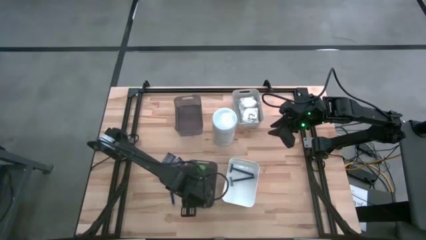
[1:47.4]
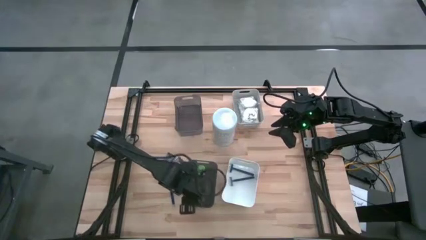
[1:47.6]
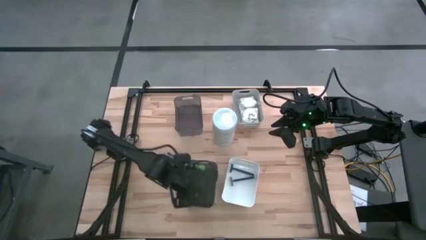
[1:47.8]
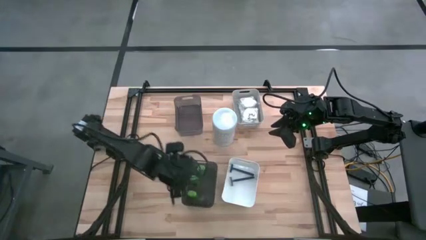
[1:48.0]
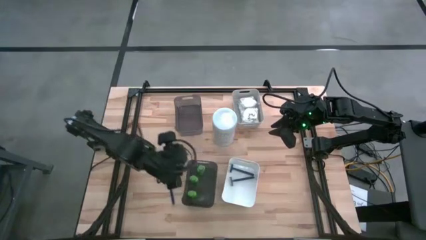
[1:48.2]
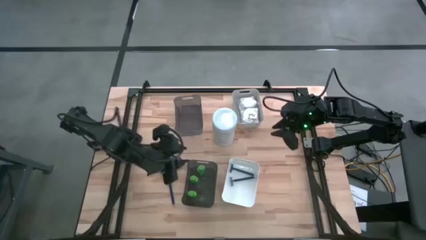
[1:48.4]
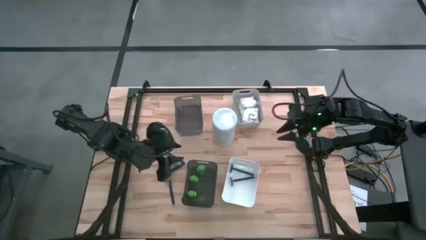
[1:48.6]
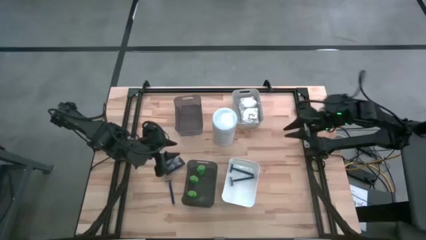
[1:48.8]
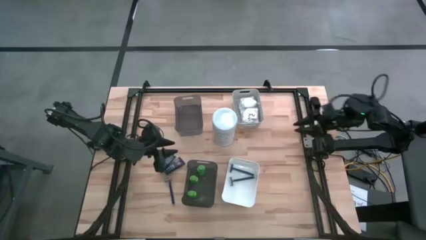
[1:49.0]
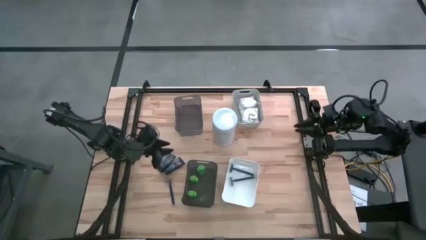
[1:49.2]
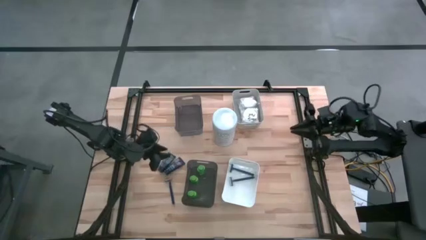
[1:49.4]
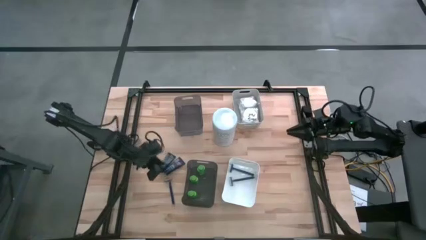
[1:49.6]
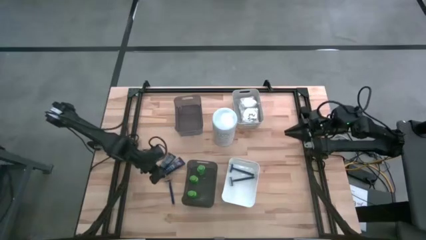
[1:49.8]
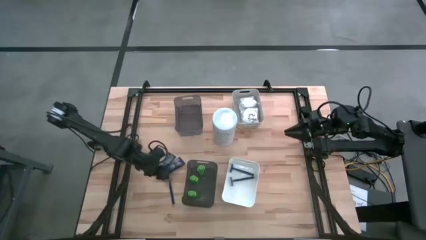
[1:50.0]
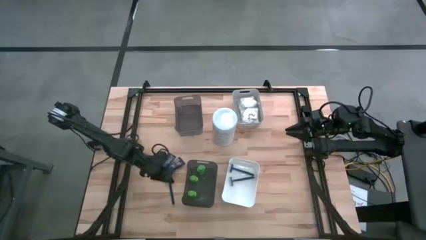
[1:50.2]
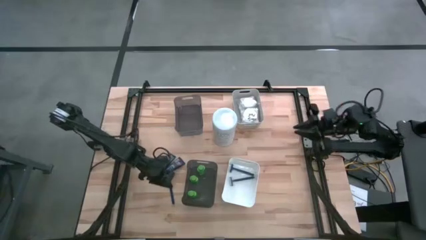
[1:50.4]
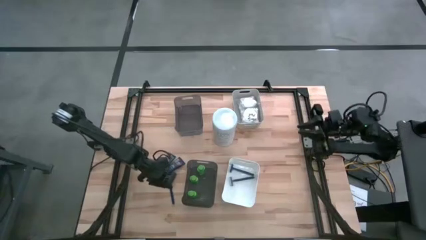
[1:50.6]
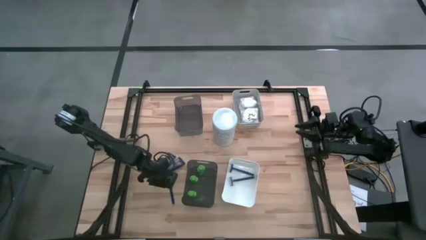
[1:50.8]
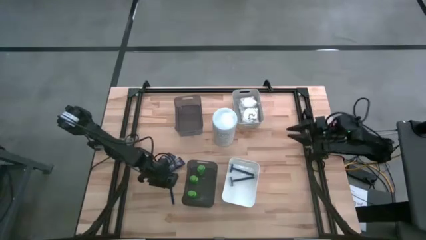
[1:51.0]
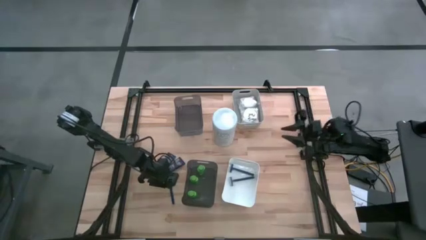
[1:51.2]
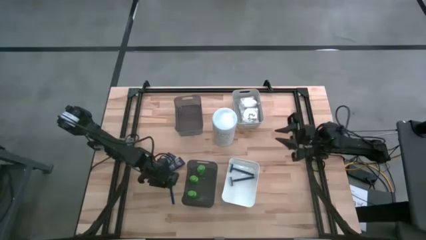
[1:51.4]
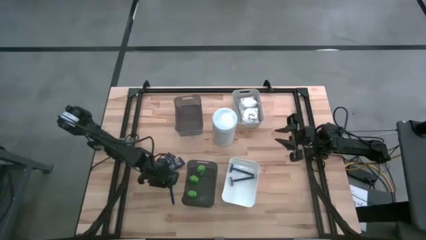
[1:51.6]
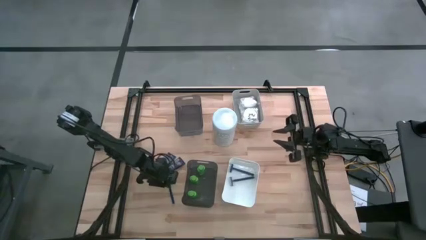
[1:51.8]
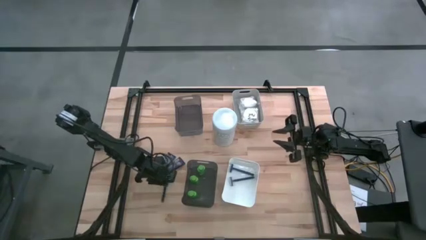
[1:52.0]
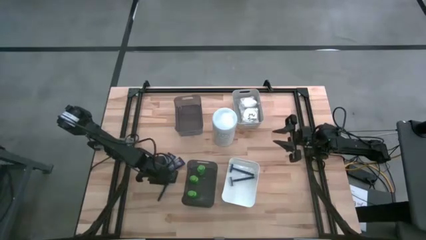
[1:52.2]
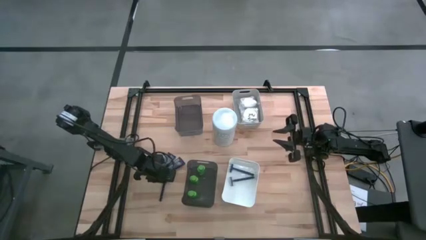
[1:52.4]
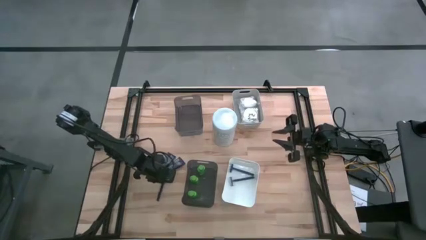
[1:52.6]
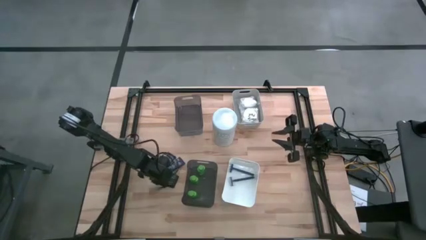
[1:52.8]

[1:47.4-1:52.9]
Task: Pick & Place Travel size toiletries
Put the blue razor into the white bin

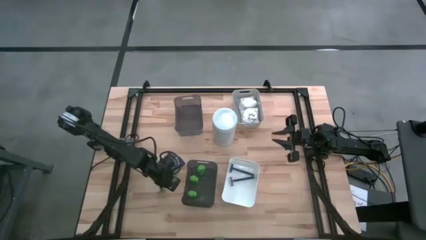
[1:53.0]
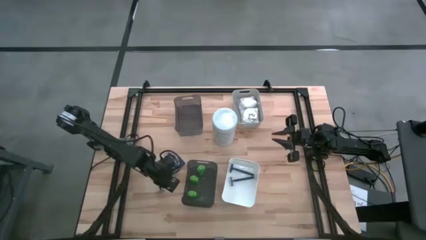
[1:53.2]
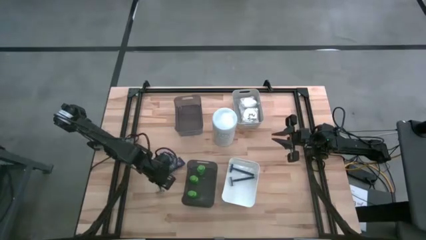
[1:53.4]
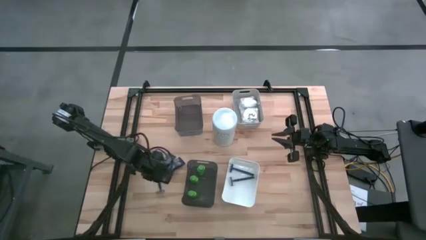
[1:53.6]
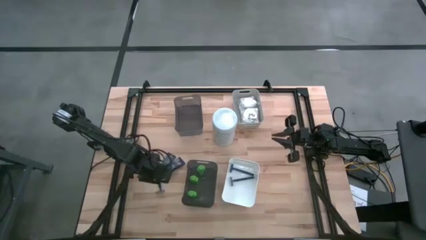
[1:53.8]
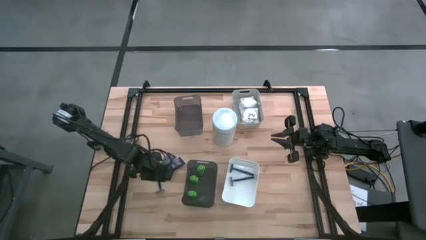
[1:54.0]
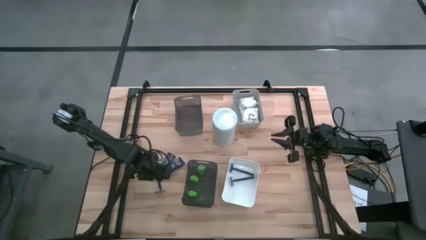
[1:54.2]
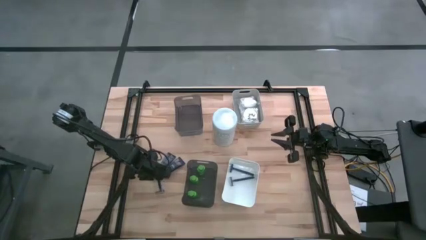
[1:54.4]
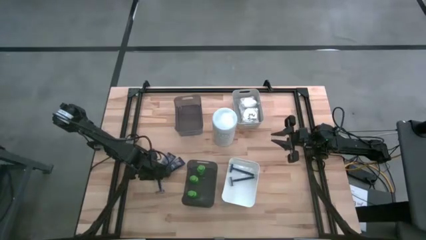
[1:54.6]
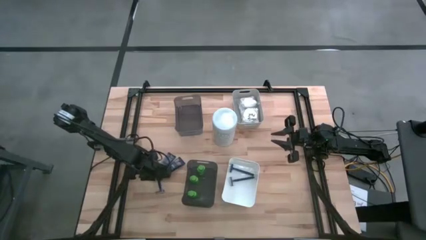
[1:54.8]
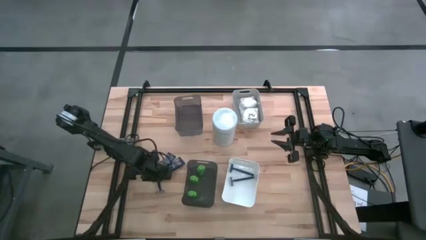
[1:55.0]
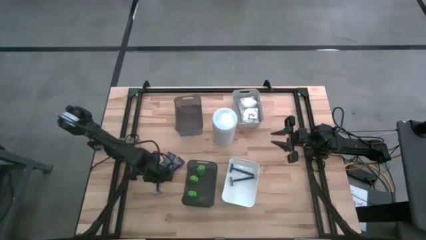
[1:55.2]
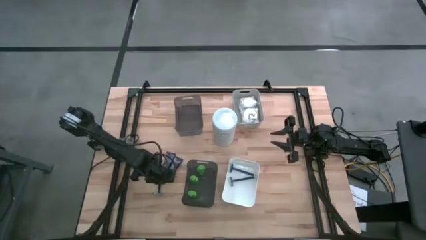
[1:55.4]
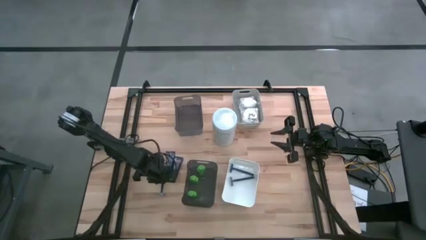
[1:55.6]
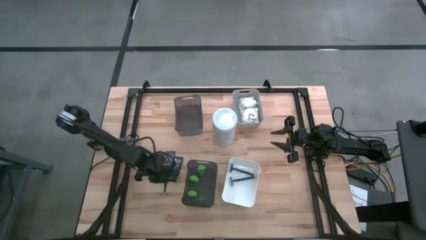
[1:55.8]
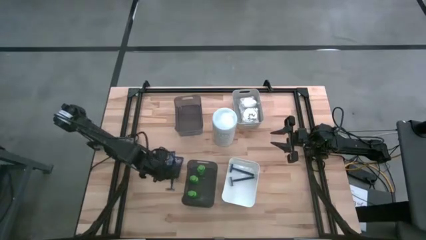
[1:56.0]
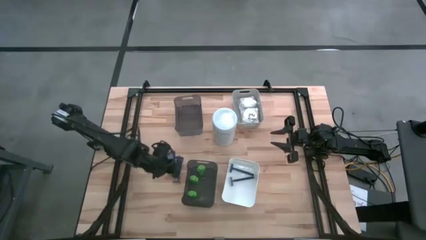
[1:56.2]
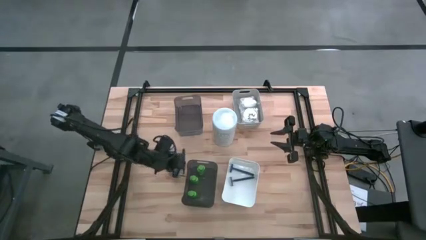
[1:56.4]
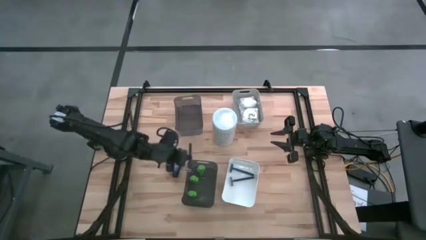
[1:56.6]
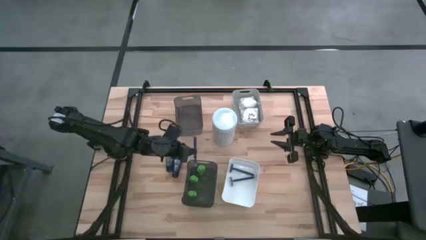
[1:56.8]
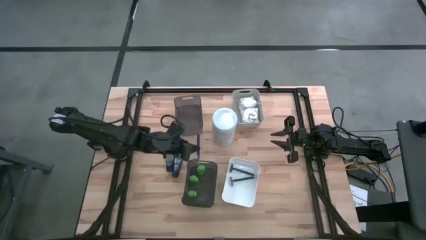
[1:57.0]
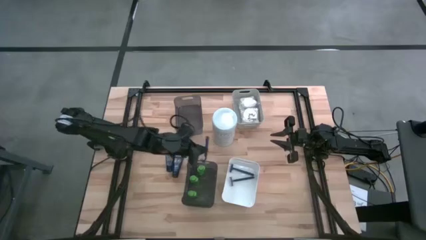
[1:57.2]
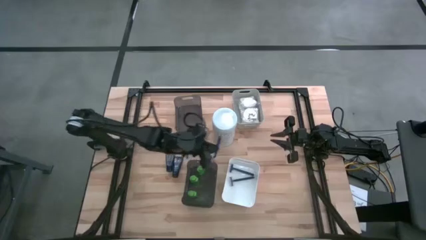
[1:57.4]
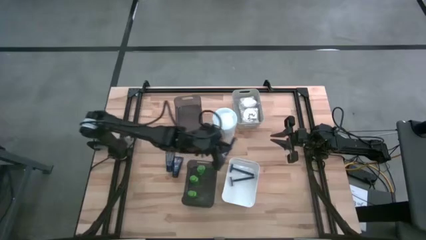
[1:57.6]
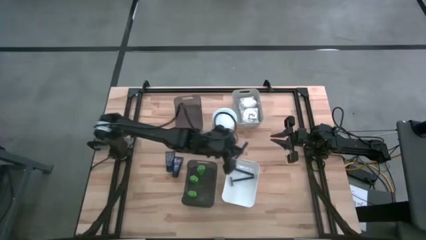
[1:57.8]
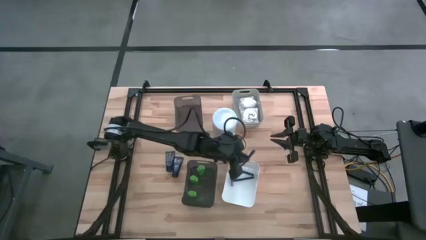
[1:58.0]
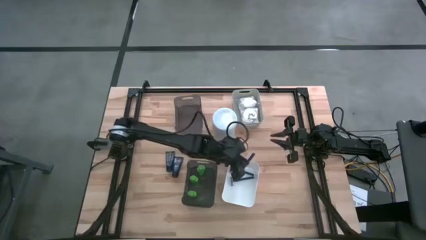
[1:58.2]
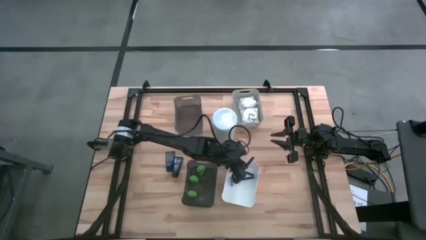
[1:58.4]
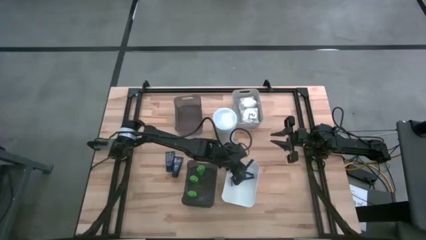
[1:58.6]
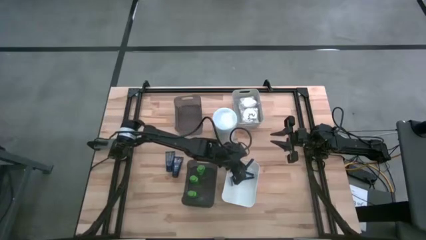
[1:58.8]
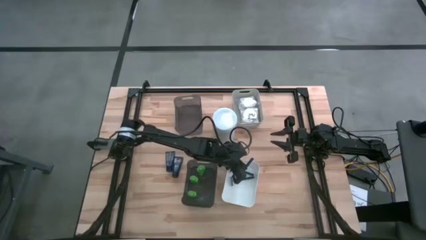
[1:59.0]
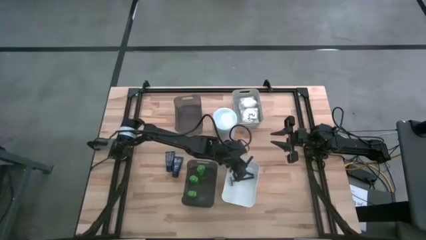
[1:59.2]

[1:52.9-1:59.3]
Put the blue razor into the white bin

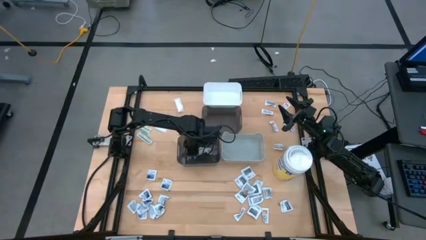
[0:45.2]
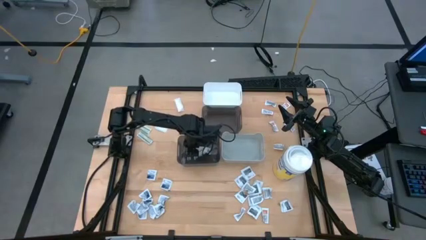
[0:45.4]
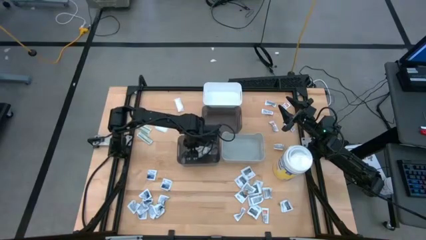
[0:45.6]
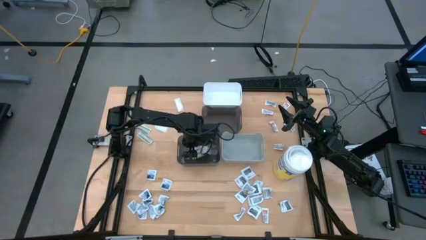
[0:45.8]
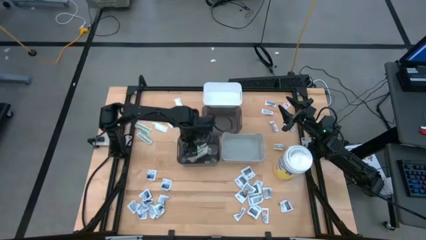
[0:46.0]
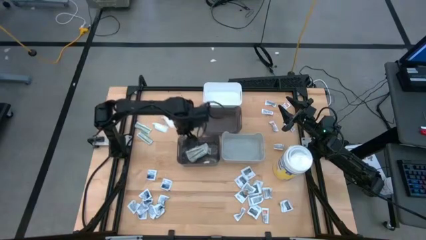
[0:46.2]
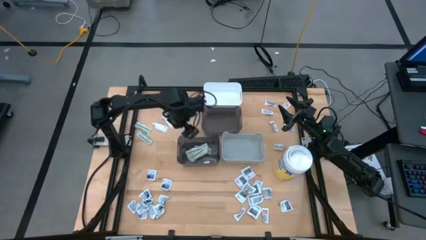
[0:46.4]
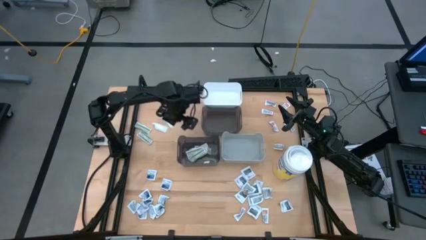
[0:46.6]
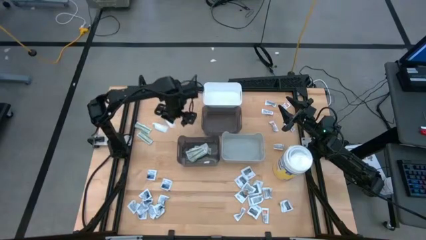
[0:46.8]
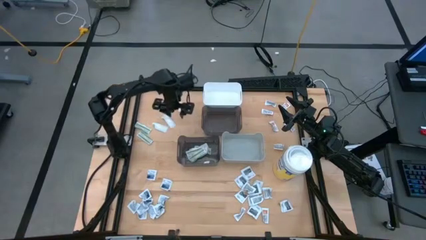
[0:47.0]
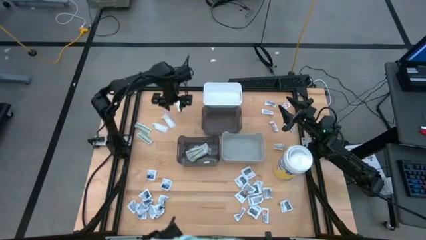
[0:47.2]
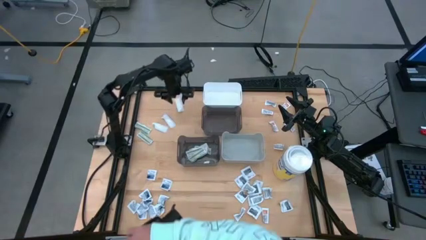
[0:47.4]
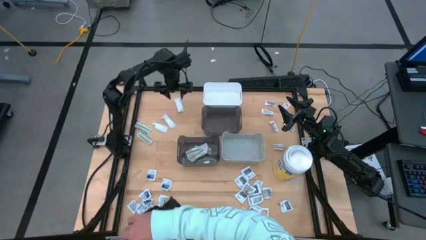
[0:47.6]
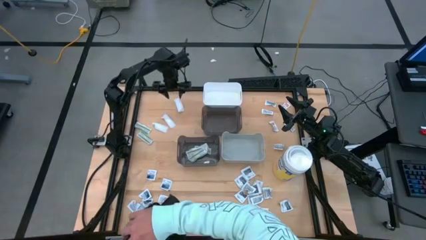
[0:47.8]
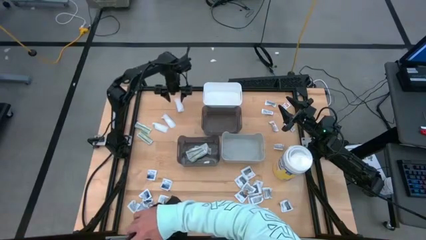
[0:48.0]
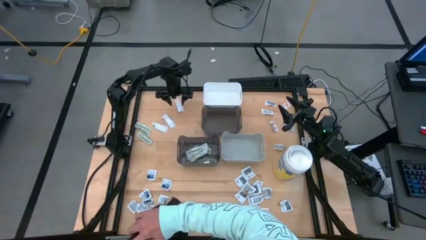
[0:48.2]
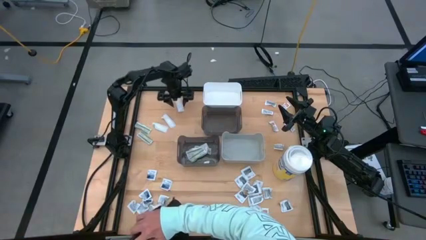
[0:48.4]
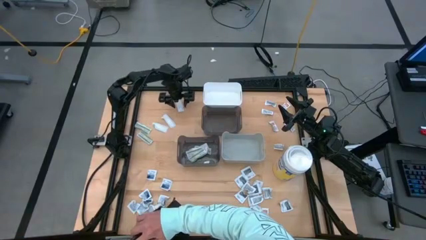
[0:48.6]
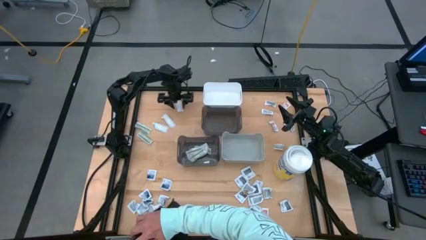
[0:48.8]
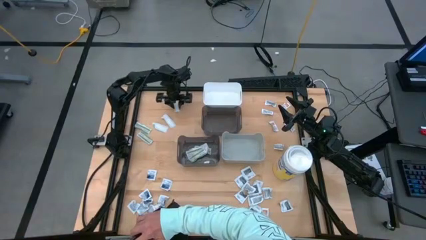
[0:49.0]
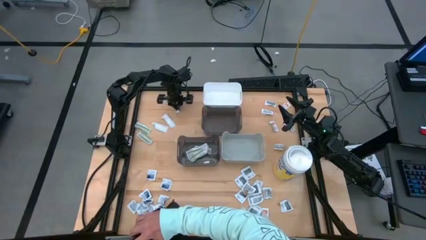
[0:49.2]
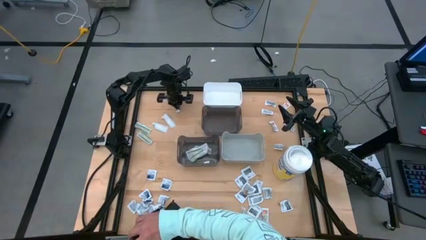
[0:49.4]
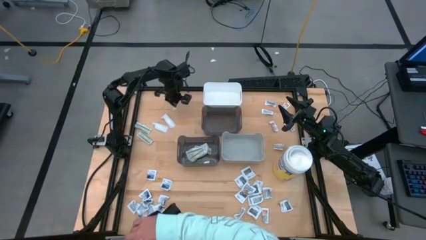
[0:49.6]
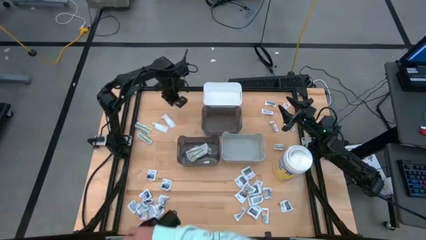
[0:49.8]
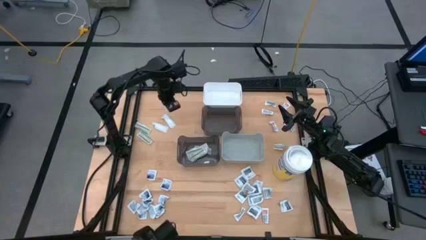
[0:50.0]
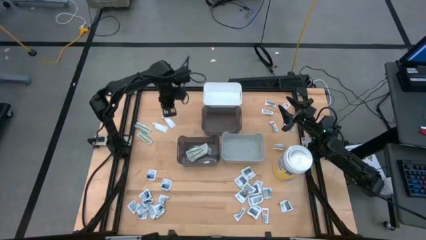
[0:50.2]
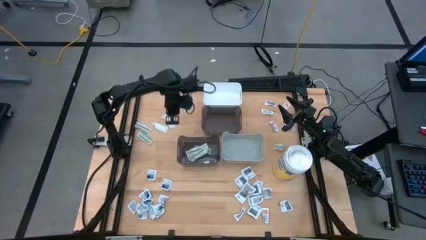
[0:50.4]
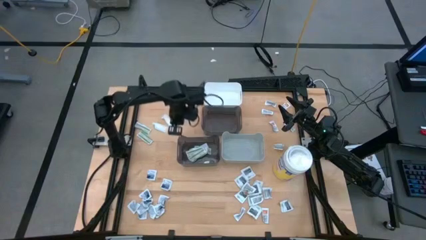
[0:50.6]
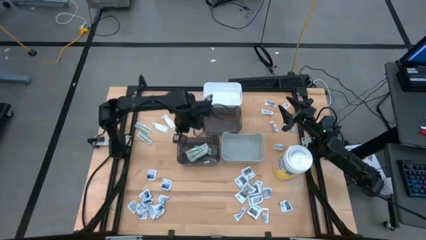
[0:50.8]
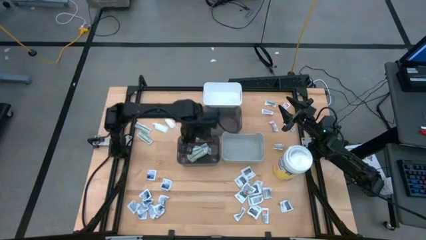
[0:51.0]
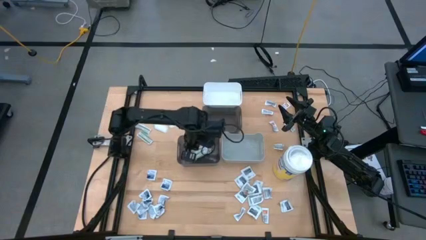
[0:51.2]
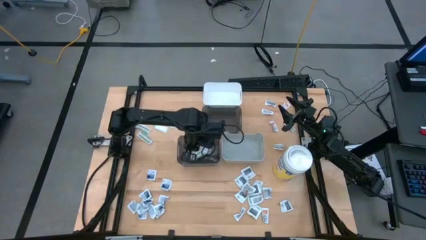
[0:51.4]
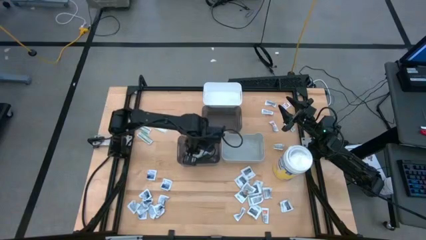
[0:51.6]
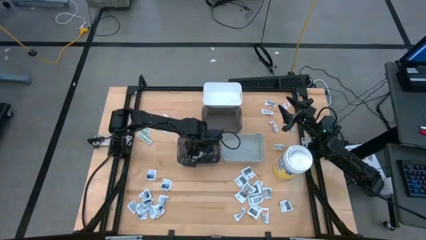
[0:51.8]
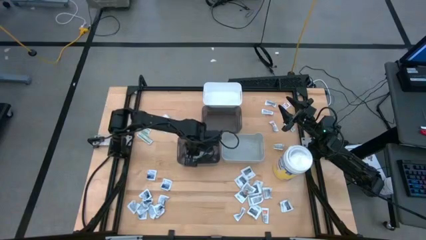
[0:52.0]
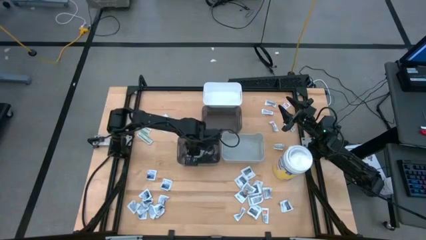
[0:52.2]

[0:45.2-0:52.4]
Task: Pick & Place First Aid Supplies
Put the white bandage into the bottom black bin
